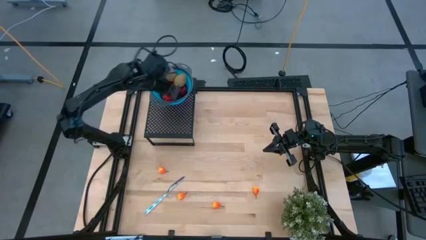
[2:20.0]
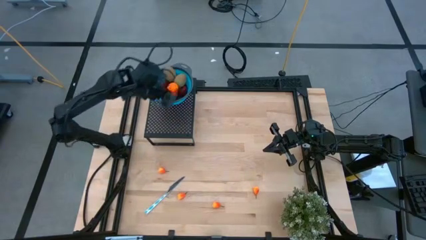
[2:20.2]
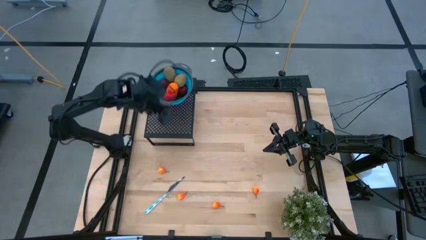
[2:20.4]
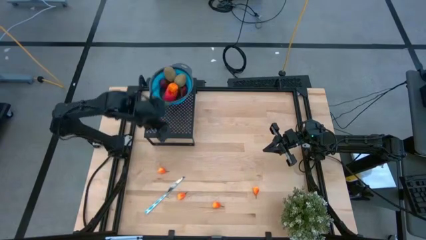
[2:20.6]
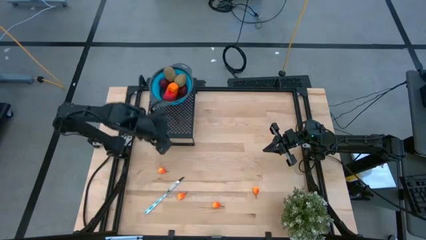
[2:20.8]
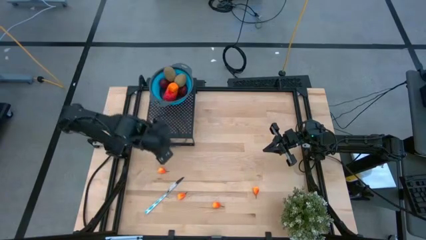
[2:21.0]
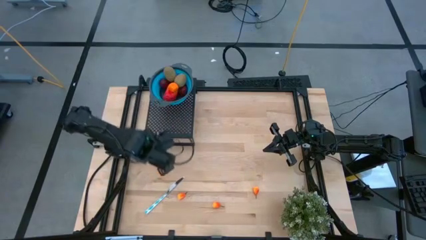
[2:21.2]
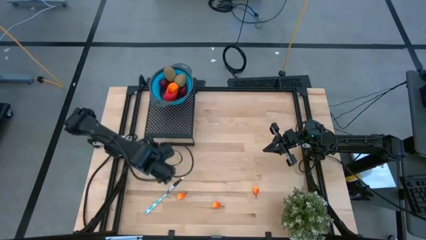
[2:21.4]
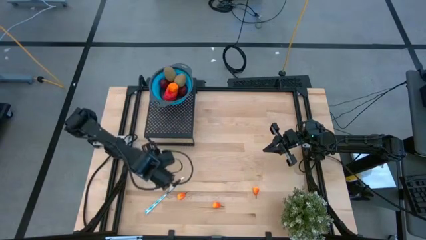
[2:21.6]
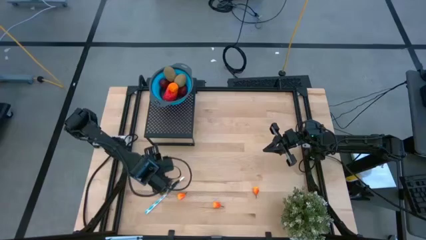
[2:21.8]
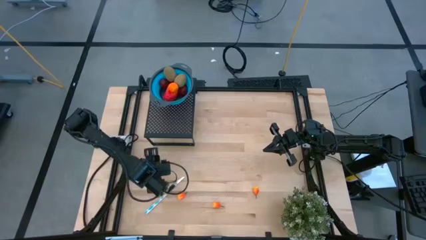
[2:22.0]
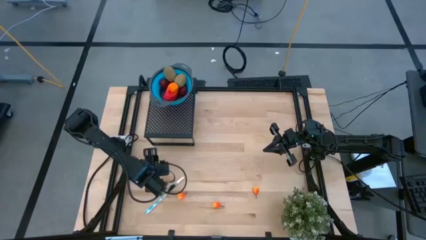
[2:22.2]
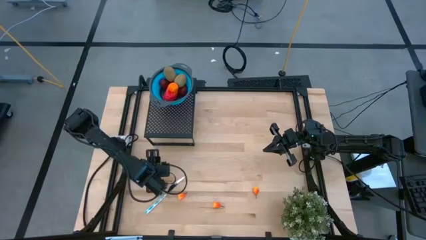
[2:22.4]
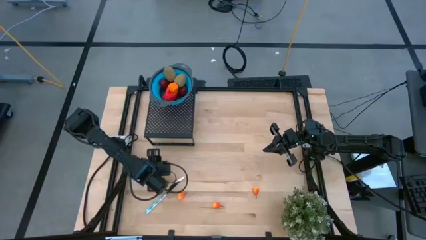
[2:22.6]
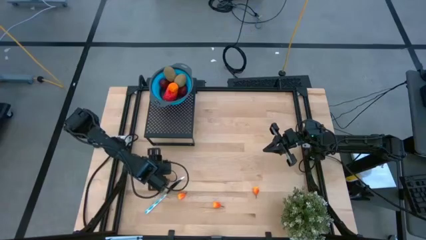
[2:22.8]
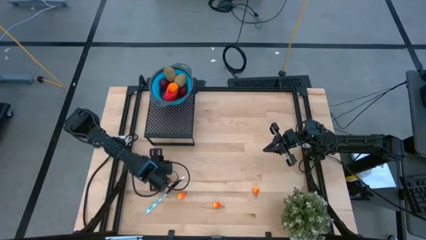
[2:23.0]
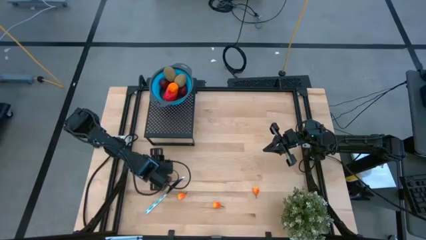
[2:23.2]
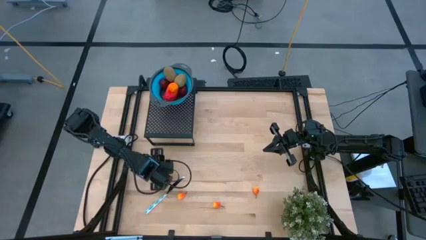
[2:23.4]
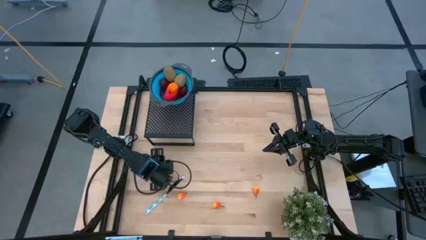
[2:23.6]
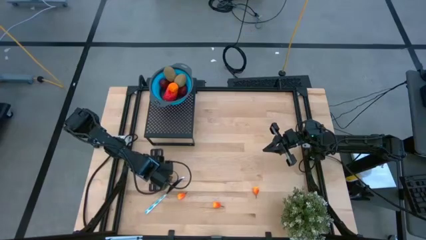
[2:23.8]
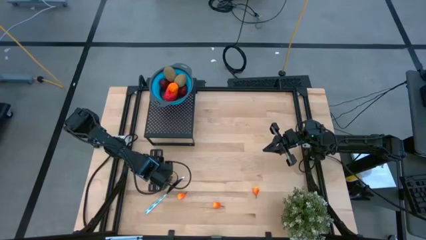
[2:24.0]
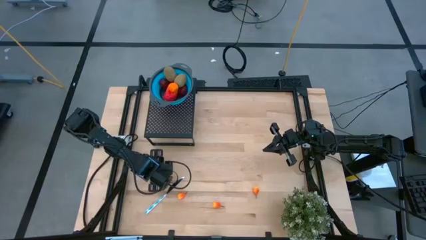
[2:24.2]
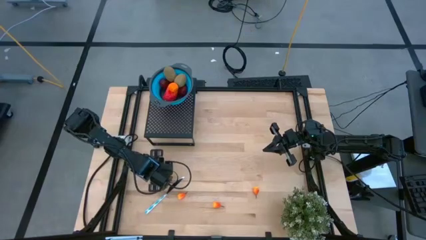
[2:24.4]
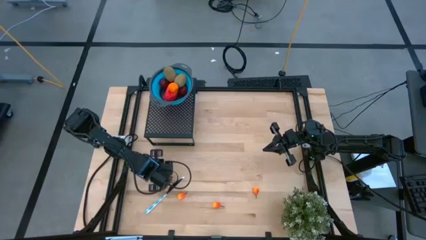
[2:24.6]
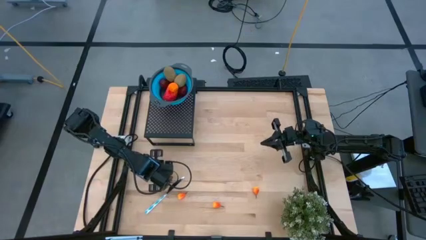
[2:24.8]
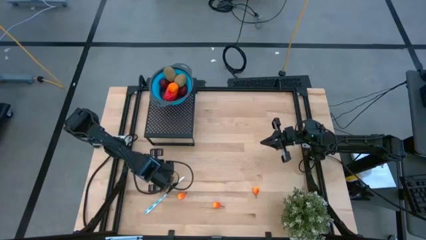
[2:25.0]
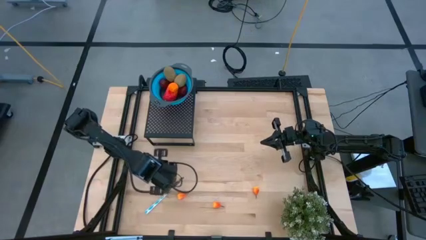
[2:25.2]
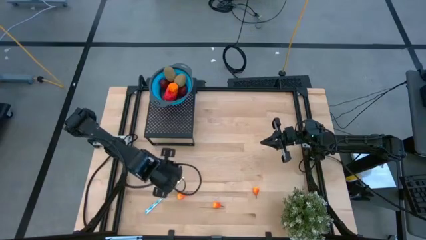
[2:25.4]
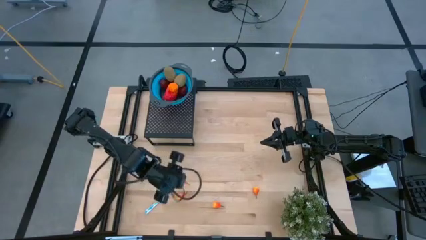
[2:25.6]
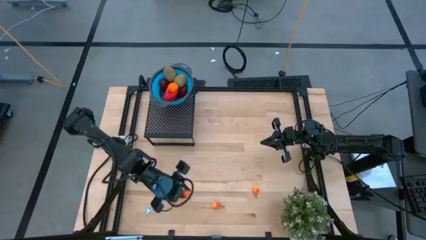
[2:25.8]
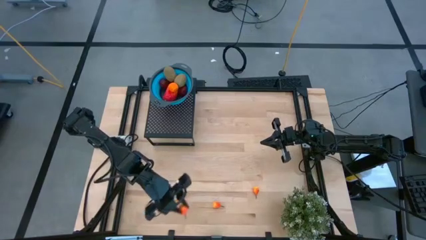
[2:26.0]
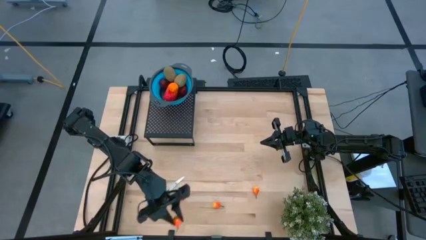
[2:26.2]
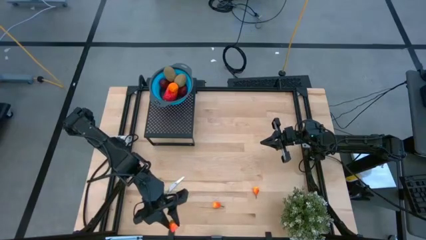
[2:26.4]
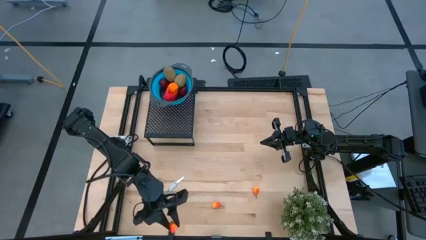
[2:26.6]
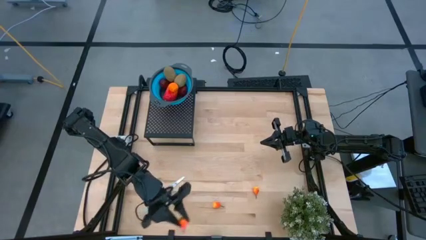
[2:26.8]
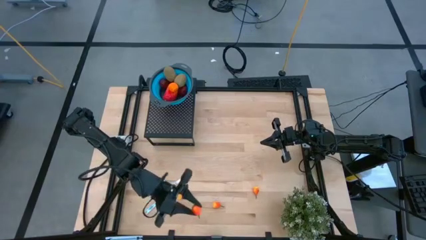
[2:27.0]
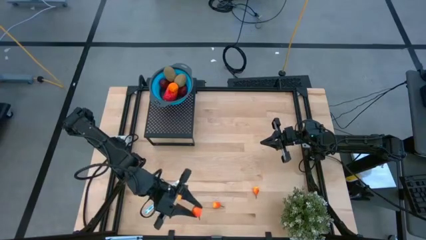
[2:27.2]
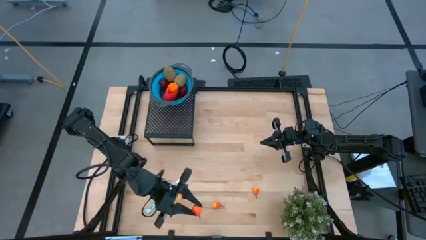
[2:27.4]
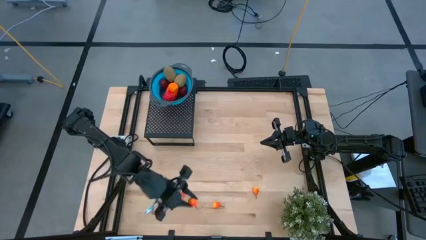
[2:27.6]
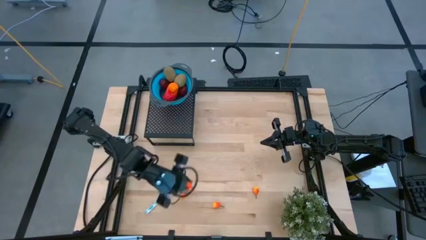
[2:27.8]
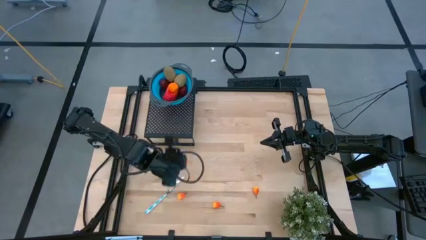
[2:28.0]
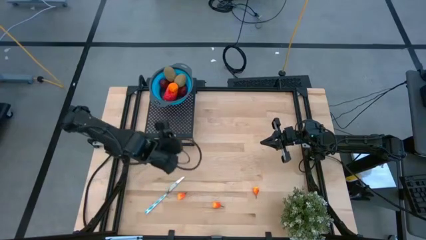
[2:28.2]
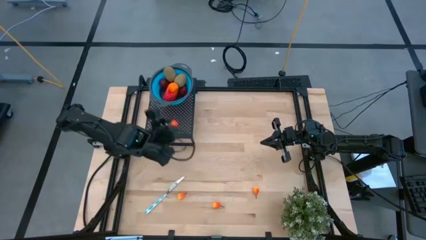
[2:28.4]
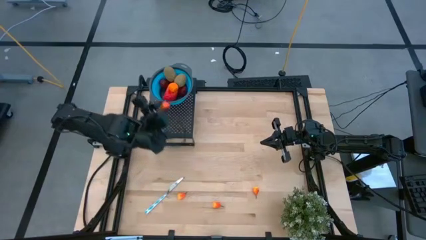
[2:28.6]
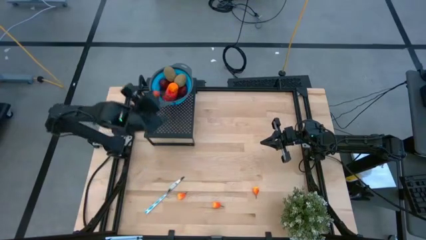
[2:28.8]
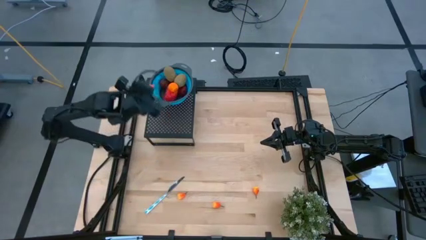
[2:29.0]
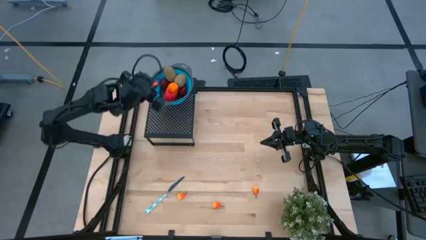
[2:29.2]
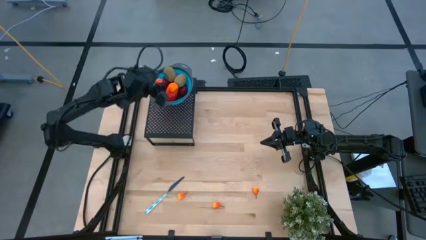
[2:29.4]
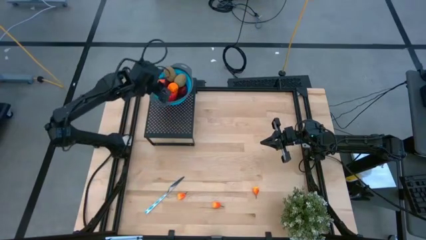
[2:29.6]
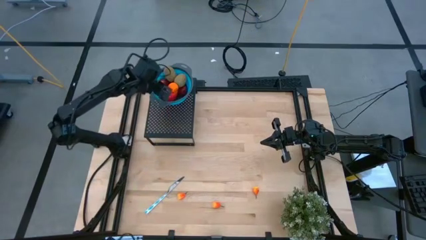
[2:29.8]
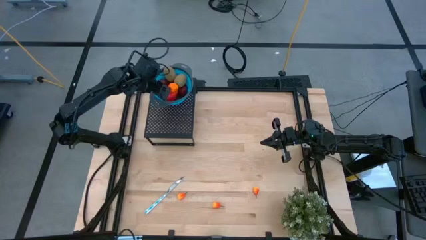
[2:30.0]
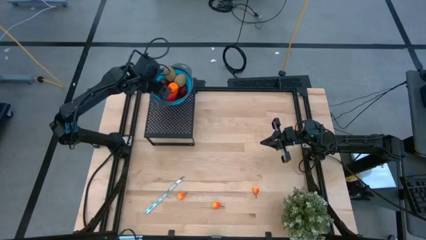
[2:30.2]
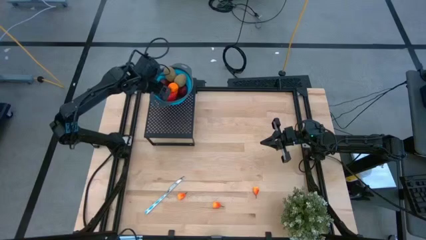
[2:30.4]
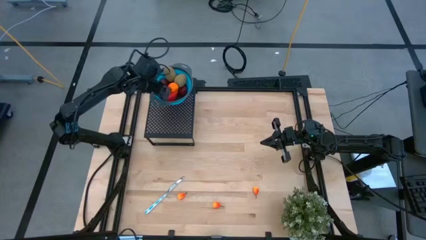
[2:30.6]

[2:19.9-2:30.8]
Task: Pick & Place Fruit
Put the top left peach into the blue strainer bowl on the shelf

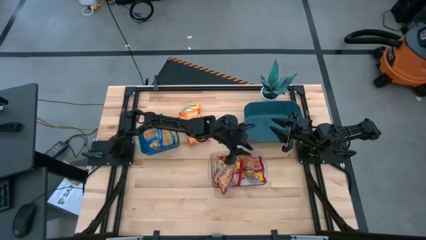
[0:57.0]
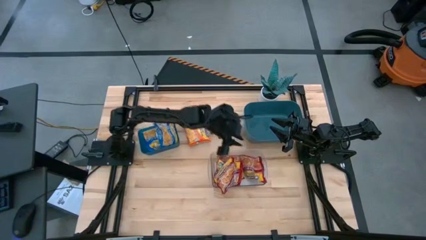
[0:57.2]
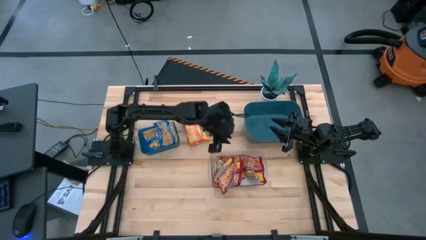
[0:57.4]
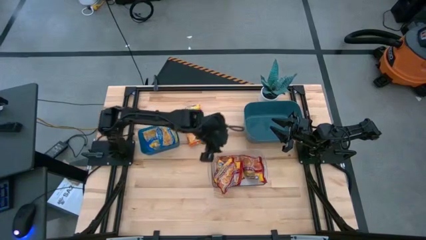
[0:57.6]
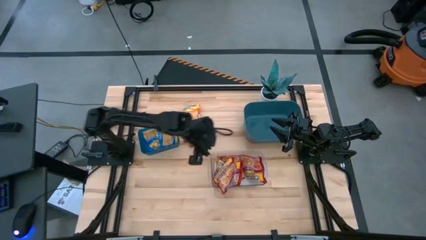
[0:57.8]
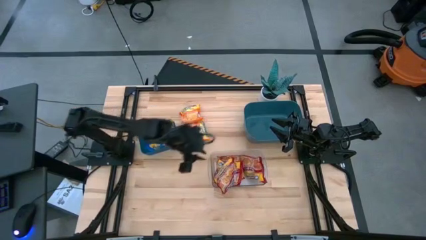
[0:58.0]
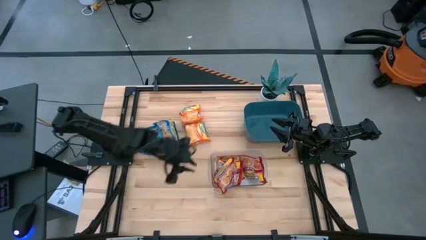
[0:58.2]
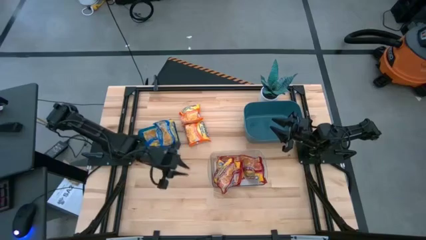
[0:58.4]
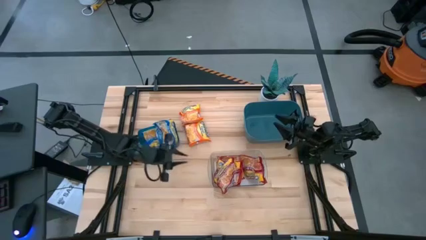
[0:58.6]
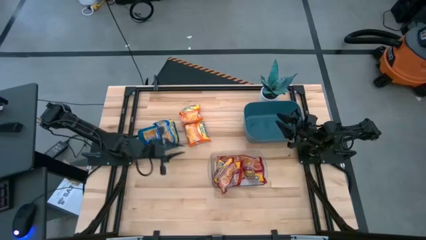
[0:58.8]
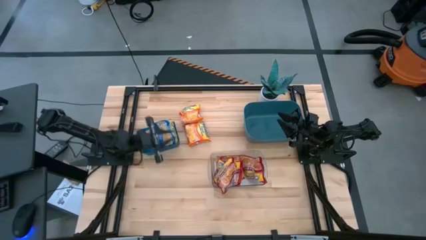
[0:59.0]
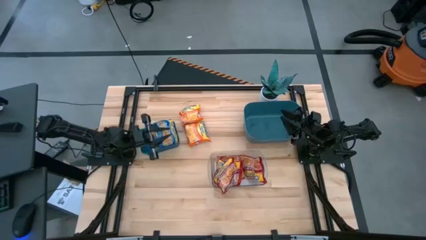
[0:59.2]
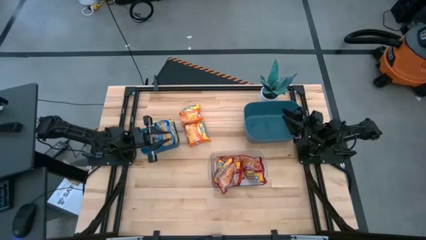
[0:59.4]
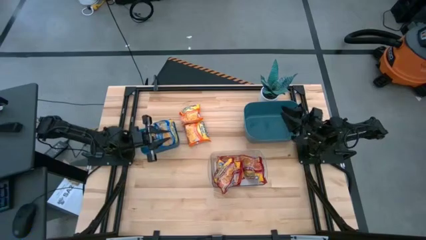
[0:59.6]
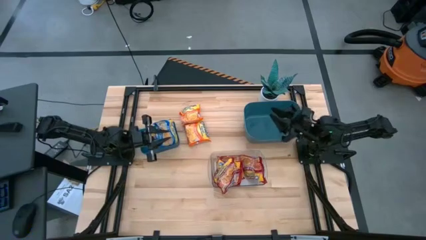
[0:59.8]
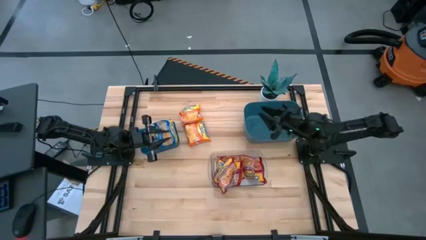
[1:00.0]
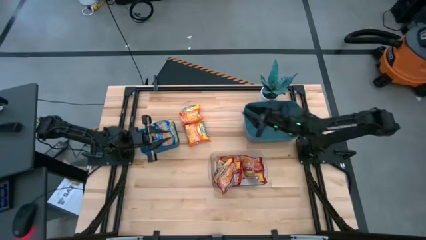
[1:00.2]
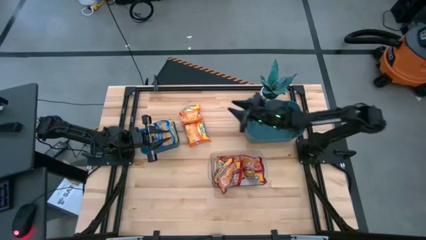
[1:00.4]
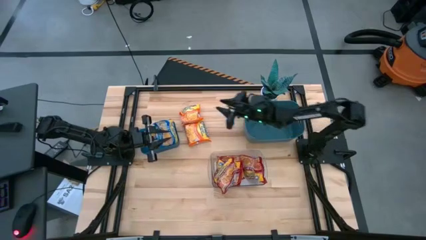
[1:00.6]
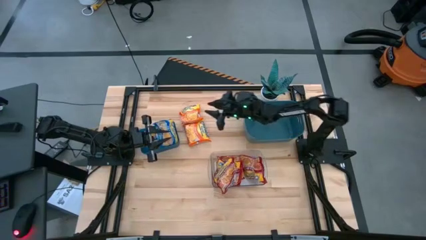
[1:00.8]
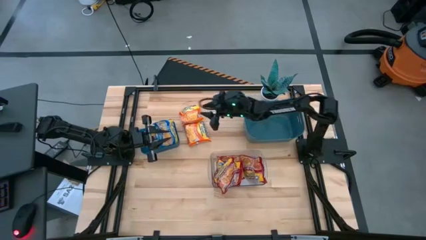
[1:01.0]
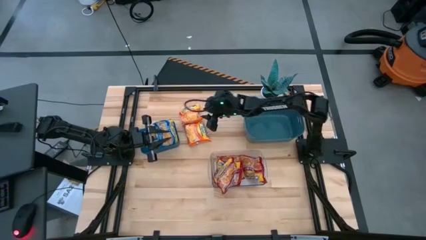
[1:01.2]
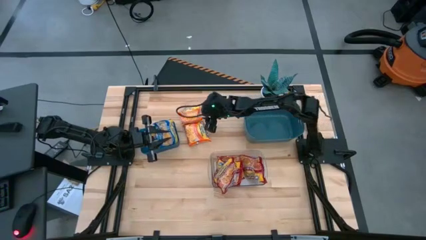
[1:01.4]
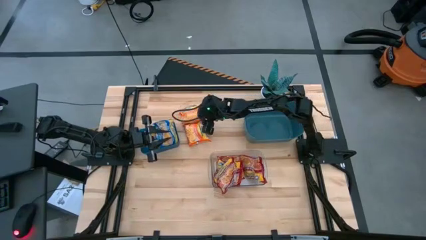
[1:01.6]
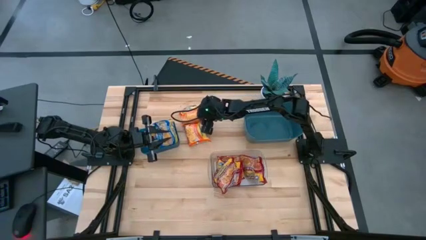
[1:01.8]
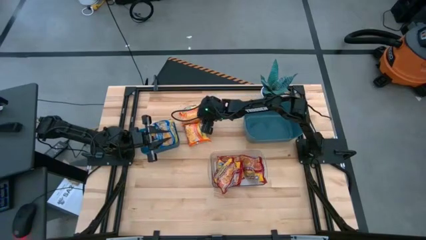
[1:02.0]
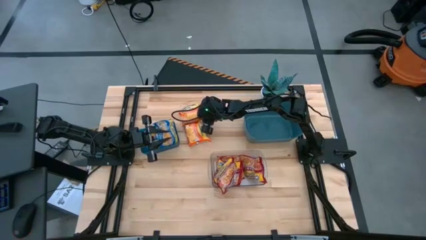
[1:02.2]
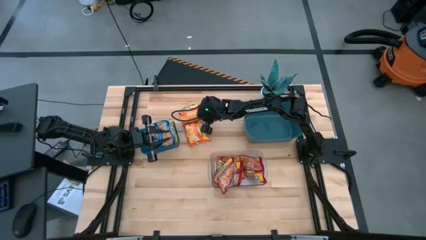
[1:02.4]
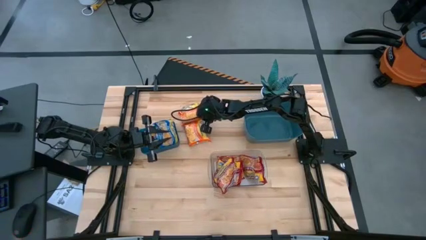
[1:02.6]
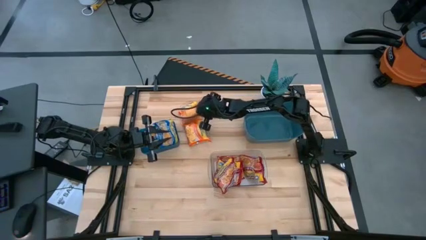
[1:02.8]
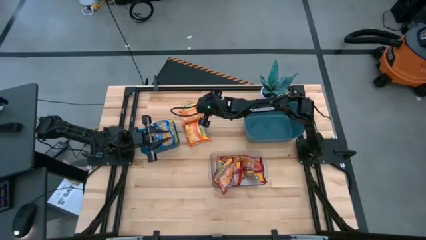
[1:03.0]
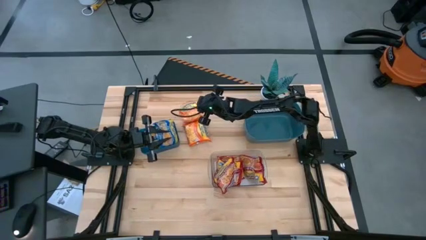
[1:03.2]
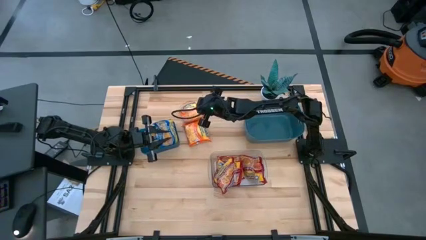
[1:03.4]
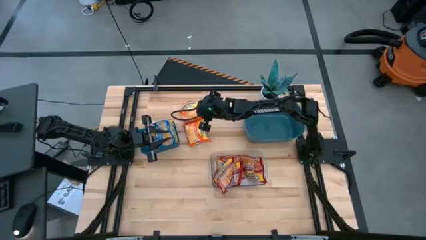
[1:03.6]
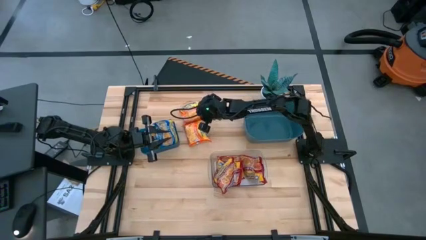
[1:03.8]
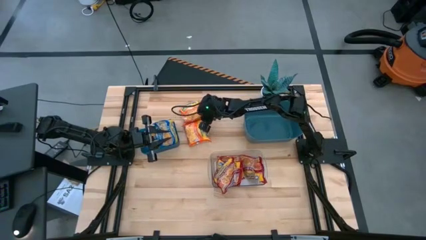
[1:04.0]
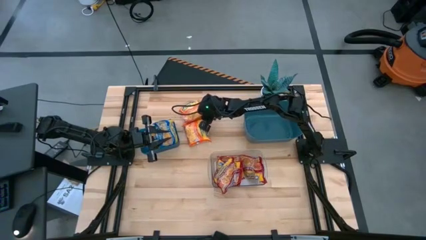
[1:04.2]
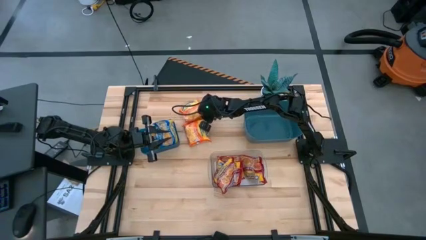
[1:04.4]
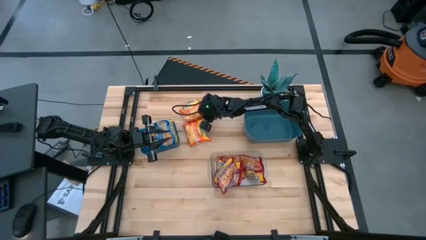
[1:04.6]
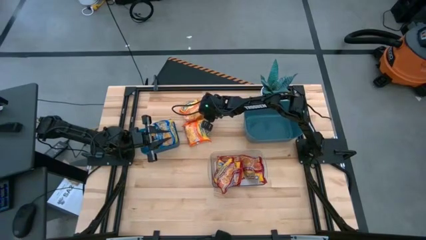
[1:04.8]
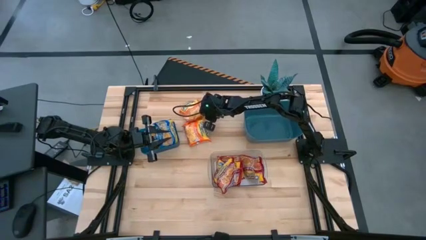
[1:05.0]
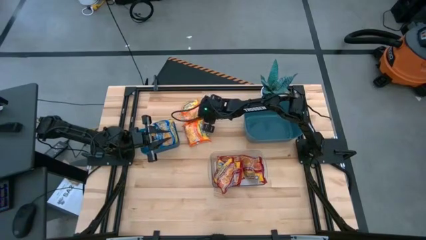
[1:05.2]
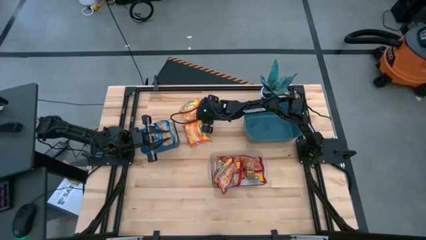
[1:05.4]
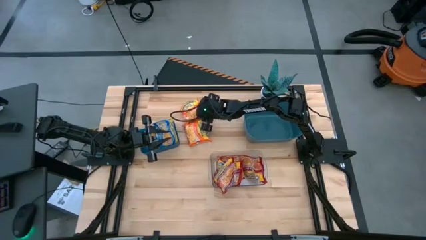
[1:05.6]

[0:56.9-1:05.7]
Task: Sort Maruchan noodles
Put the noodle pack into the green bin
